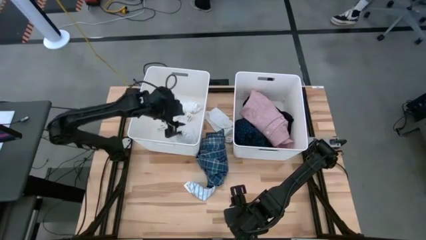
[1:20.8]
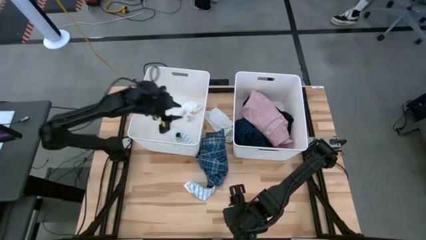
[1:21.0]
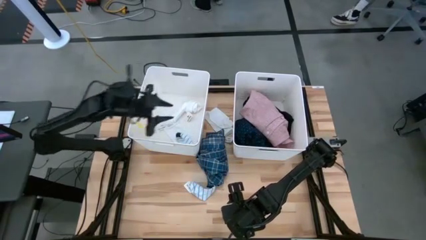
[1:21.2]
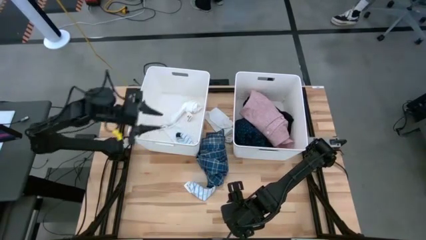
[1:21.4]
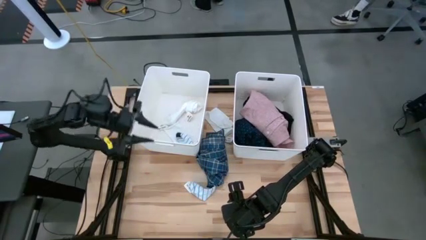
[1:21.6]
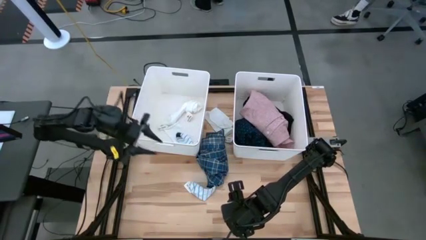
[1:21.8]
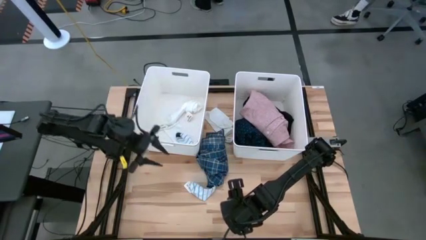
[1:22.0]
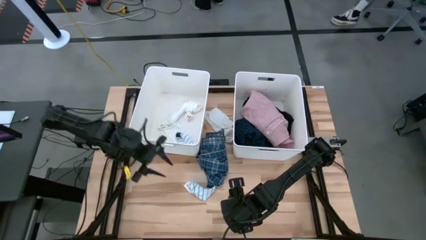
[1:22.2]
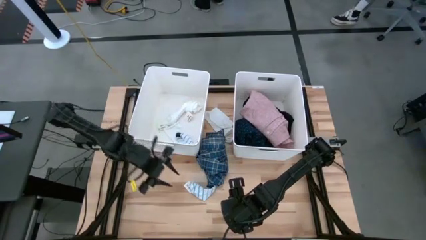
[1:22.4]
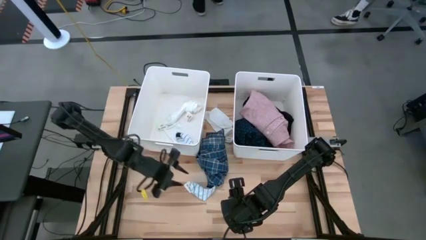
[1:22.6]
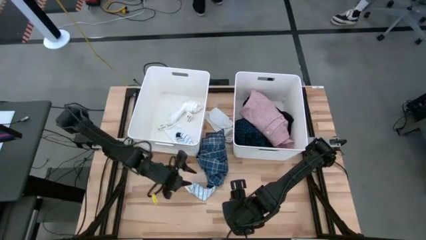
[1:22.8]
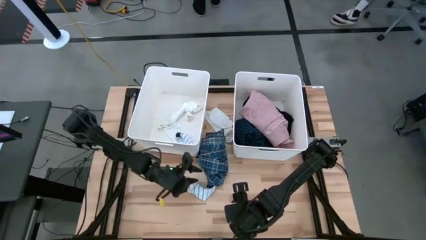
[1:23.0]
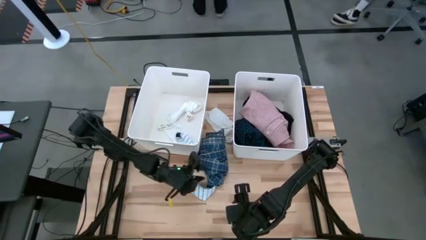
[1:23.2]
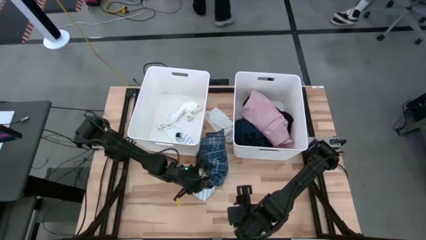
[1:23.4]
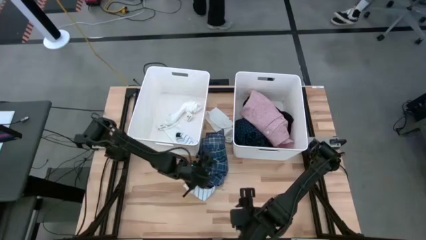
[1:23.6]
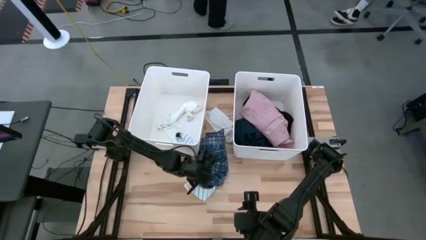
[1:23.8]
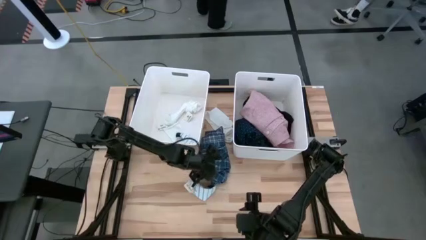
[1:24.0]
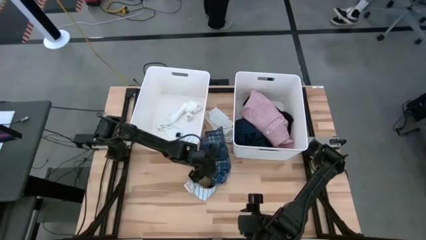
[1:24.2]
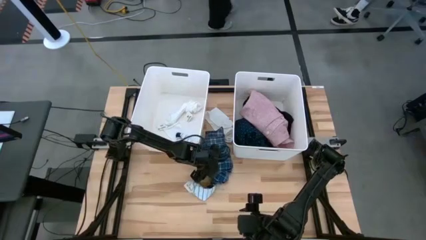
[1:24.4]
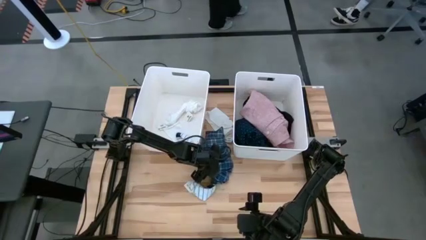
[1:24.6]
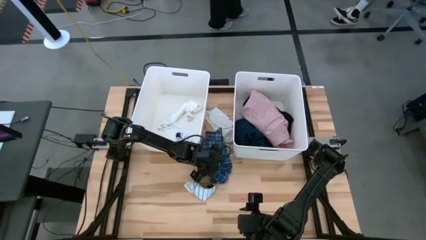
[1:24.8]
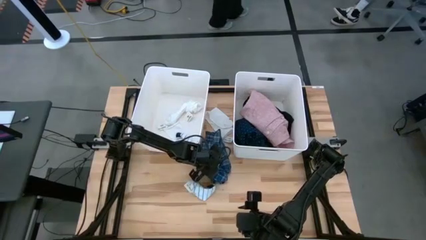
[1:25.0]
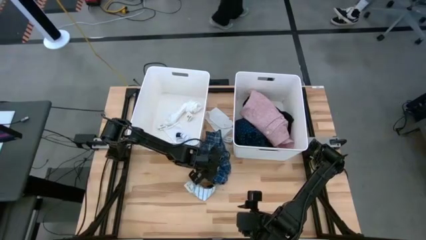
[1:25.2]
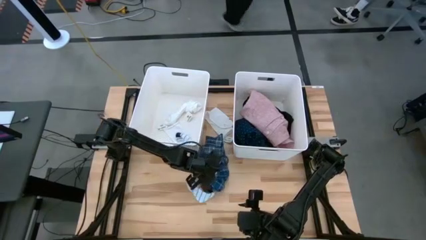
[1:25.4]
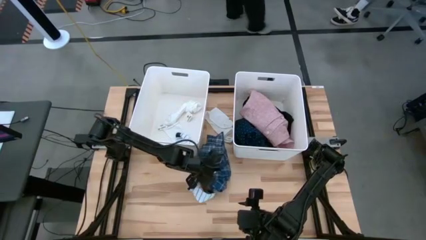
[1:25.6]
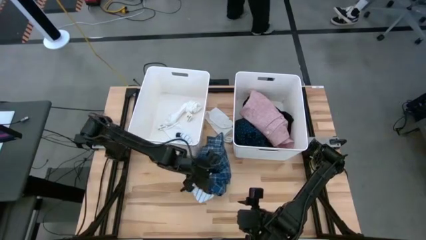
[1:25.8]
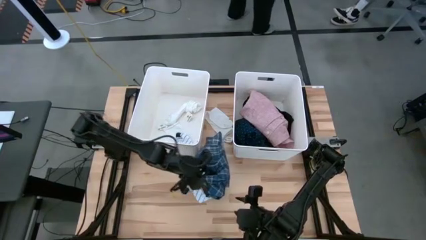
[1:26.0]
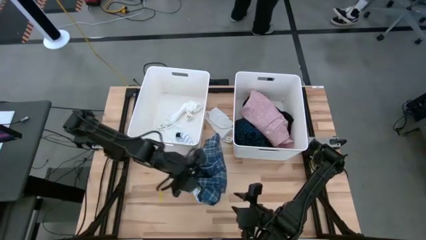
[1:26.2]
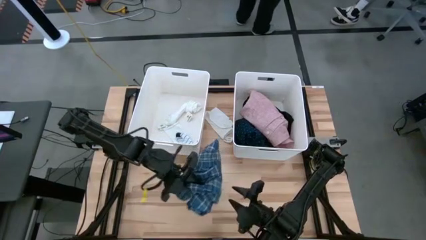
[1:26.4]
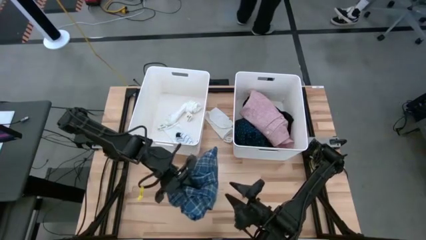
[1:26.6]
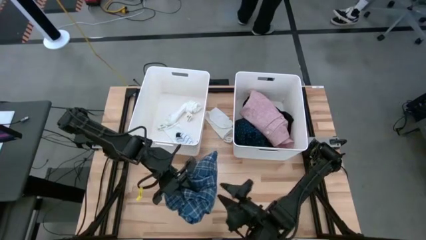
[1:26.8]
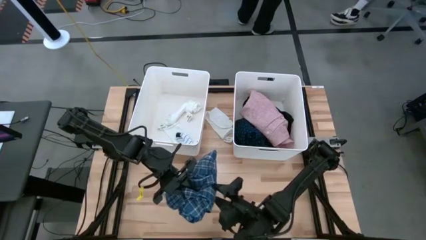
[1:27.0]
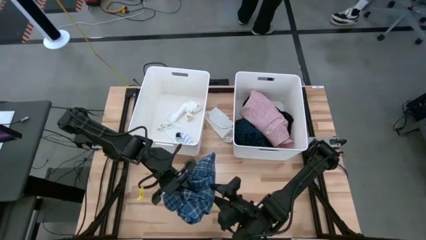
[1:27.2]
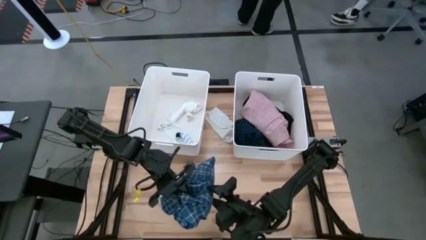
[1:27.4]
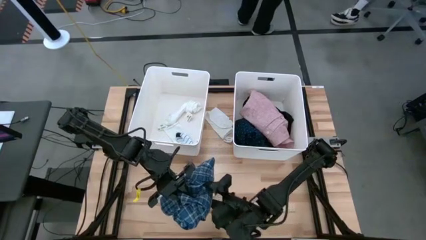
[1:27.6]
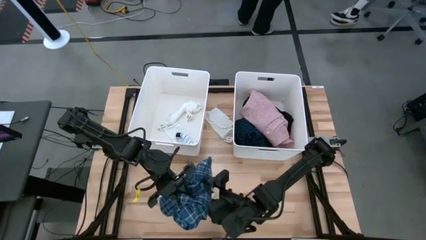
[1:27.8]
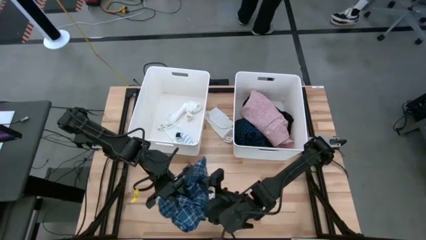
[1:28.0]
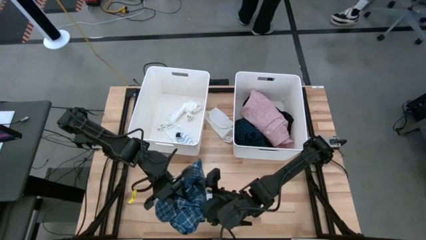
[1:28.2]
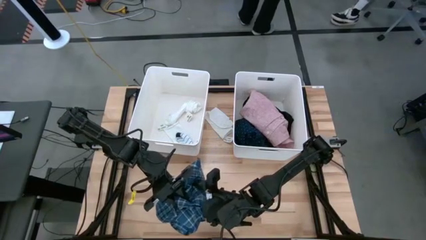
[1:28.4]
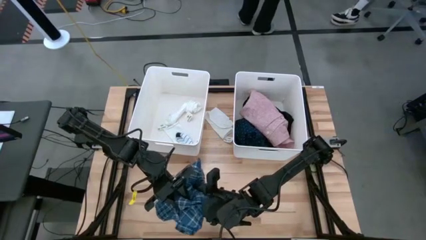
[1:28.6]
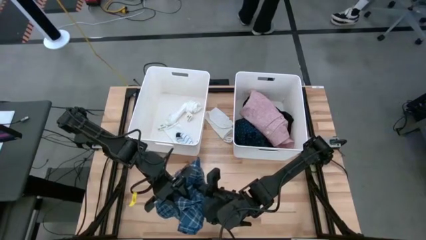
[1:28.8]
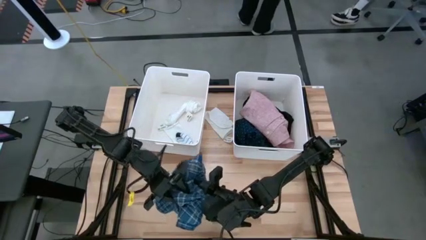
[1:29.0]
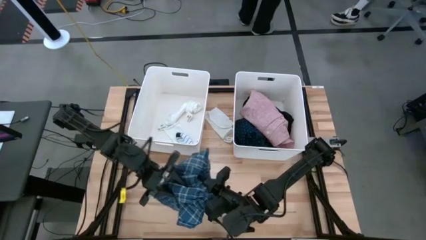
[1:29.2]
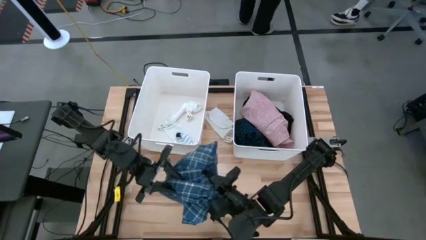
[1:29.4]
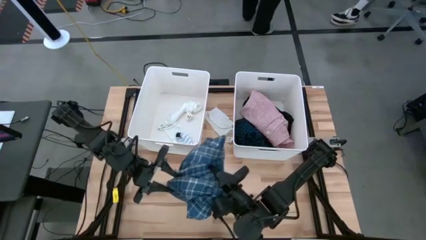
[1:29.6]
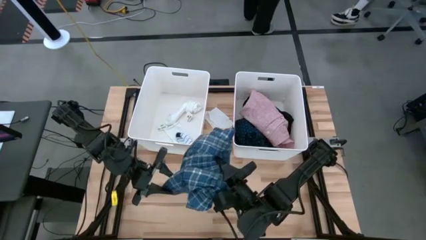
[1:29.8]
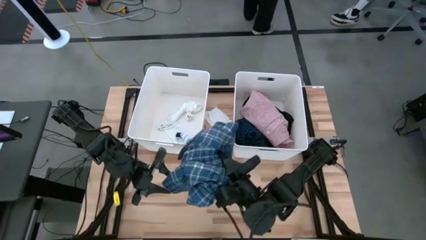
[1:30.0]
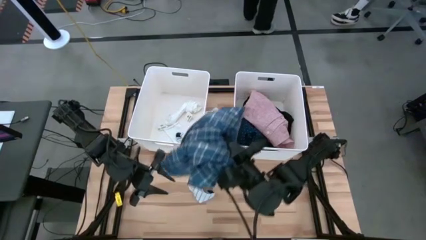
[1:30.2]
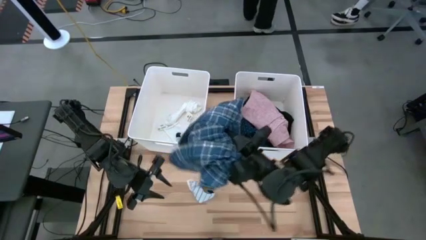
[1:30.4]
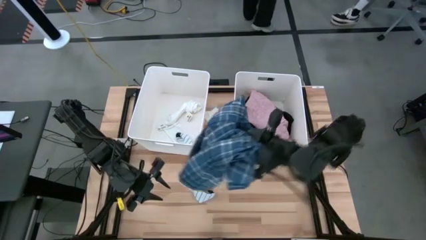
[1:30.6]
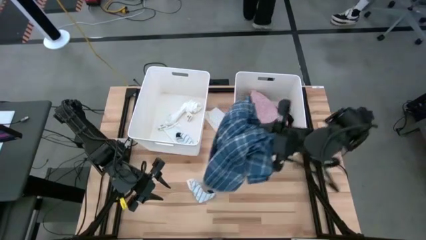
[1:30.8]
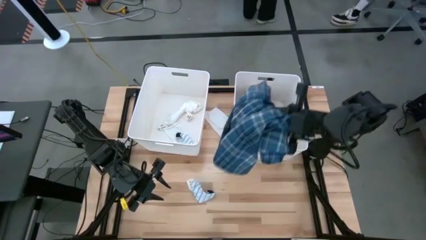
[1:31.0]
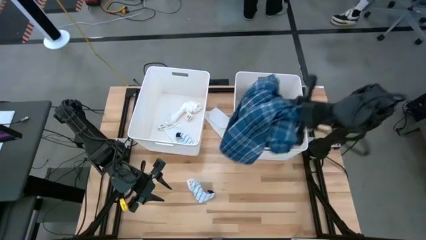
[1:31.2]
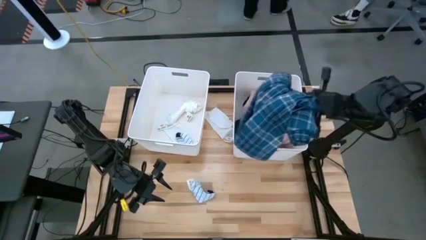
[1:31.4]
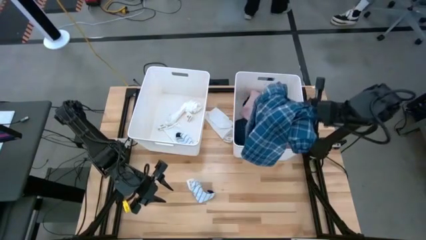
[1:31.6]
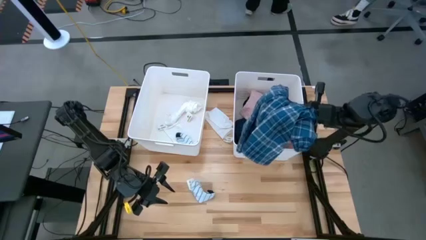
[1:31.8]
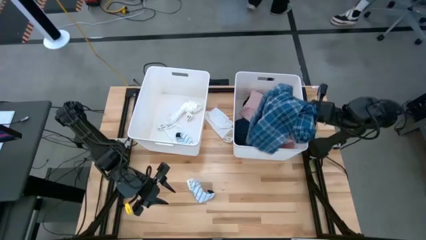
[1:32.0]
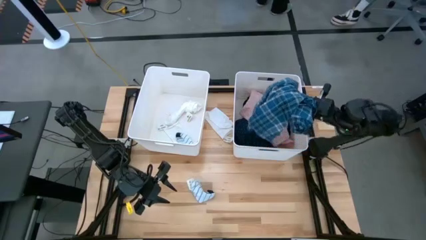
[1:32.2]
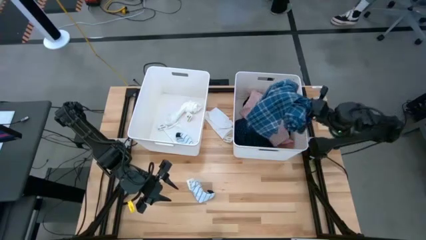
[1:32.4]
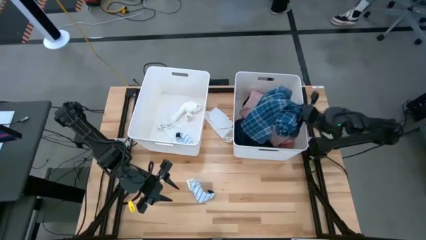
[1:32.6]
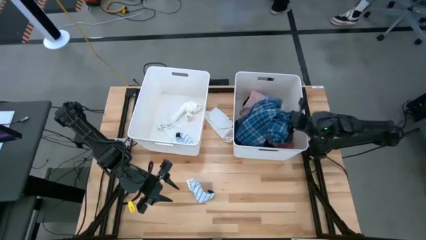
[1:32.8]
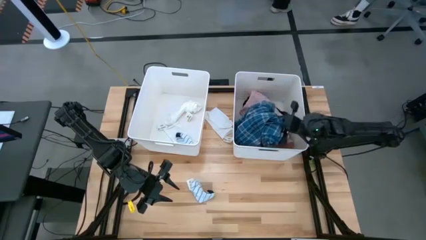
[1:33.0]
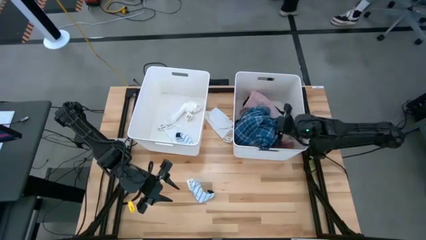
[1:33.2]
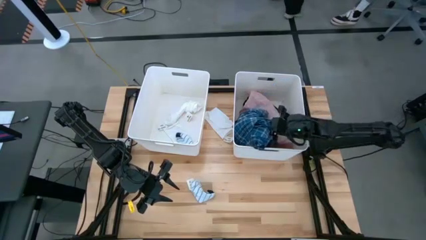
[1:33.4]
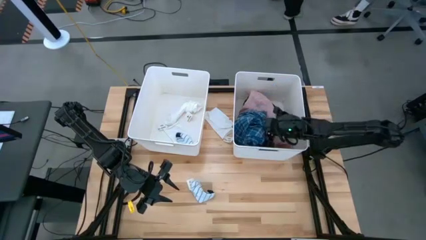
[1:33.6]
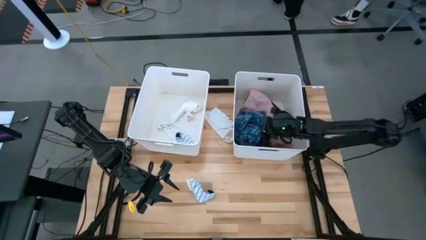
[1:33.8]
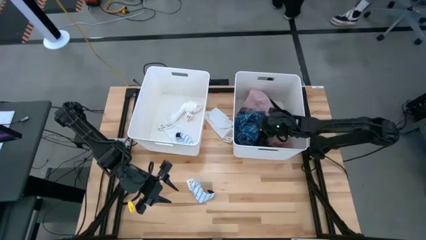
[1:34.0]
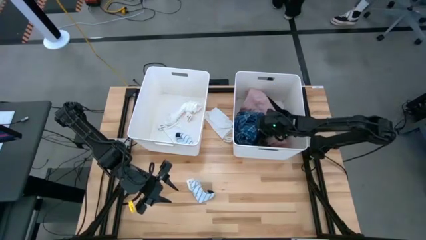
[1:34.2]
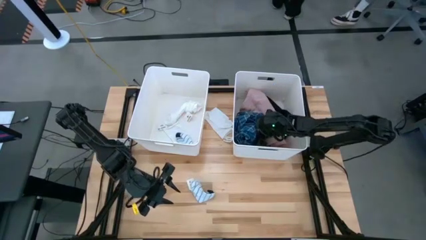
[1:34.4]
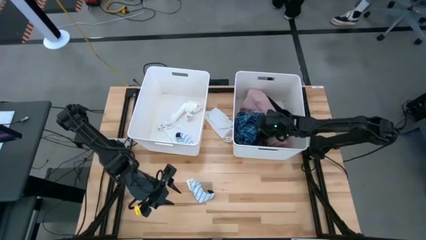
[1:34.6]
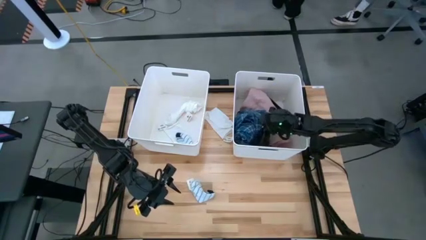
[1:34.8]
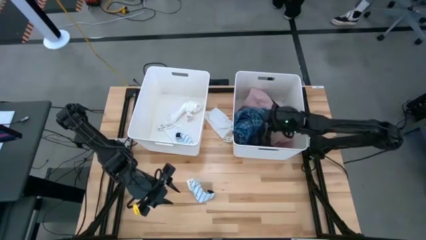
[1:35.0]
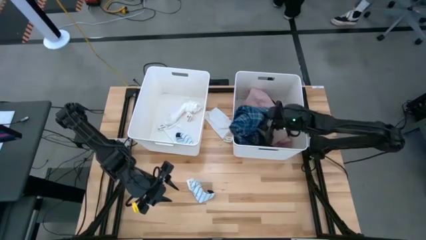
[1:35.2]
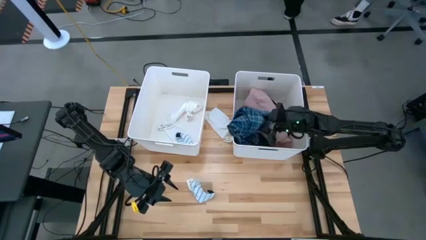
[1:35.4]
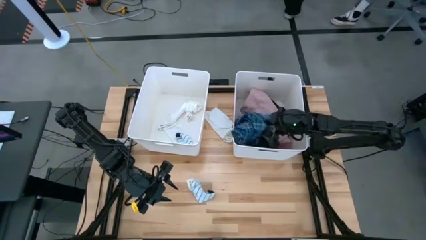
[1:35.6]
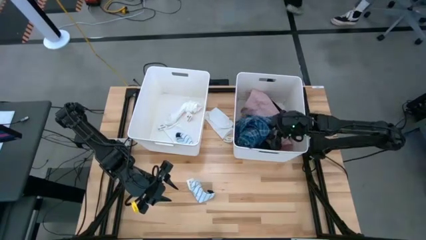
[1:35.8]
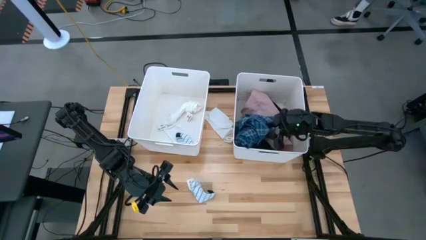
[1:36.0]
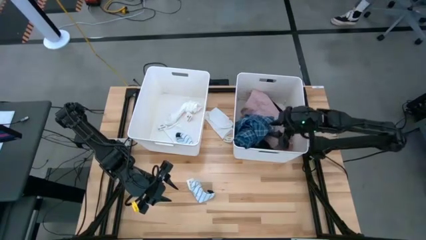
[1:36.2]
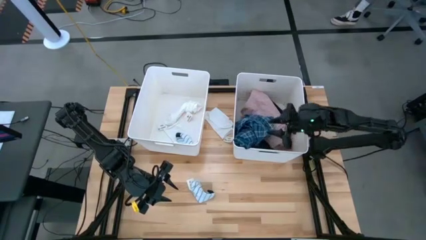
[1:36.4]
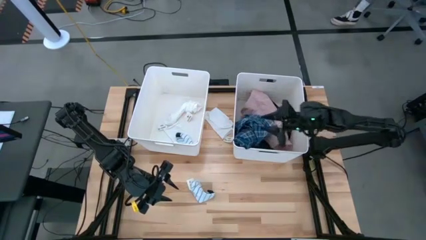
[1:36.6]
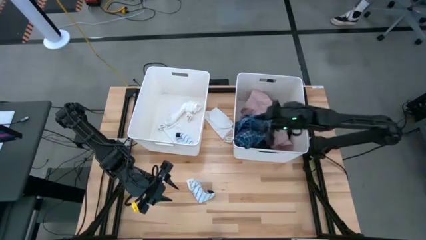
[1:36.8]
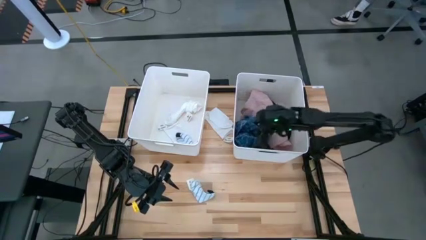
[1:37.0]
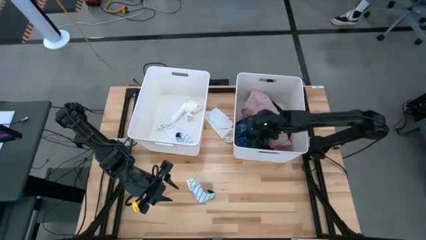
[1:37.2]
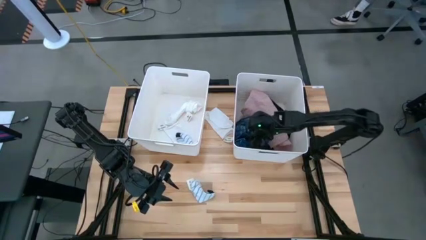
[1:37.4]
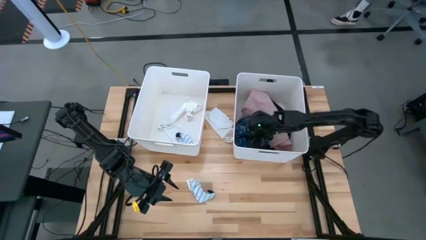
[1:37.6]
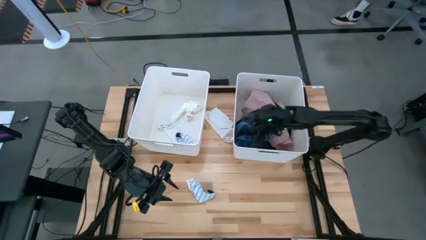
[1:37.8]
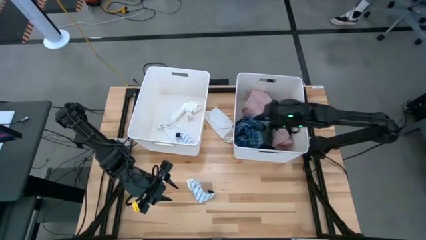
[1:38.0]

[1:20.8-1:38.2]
Task: Sort clothes
Put the blue shirt into the right white laundry bin

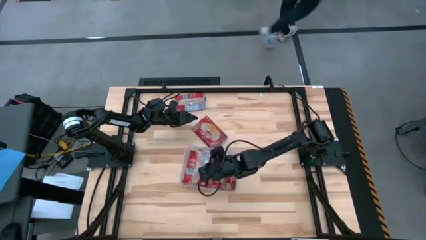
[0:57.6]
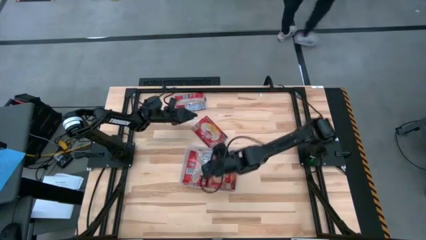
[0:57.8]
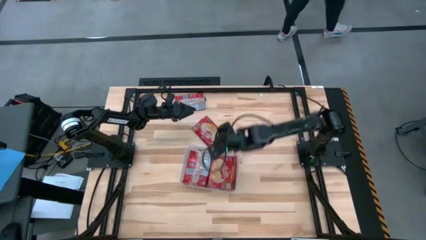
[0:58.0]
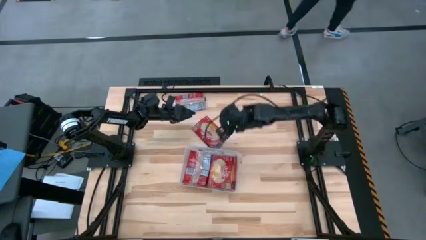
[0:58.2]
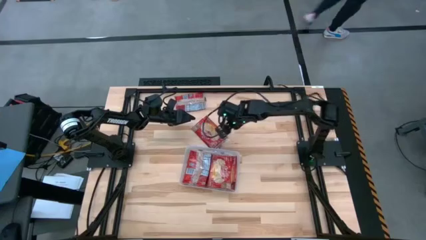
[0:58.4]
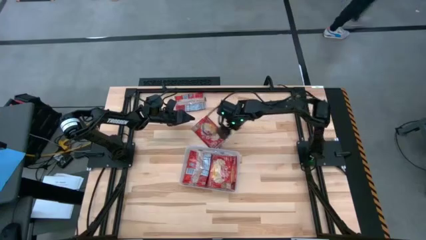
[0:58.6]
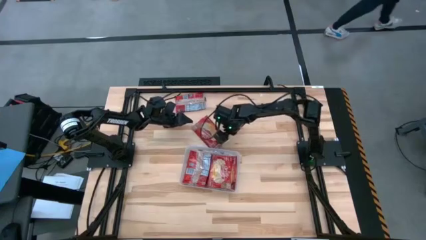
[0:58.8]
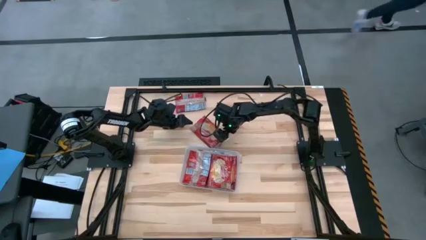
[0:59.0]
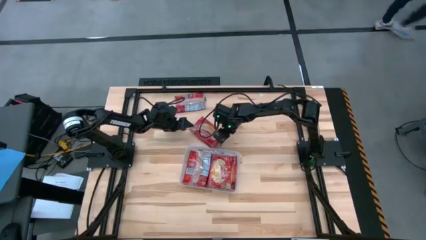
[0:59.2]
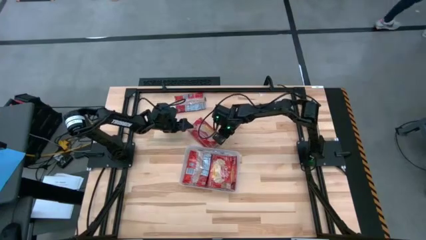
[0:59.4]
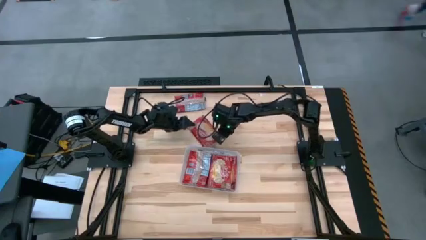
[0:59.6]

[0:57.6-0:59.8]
Task: Sort popcorn bags into baskets
Put the red popcorn bag into the transparent bin
